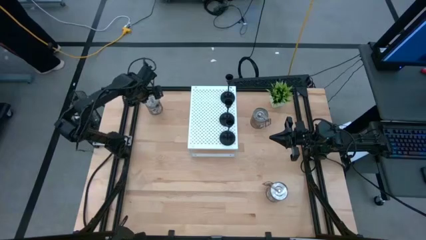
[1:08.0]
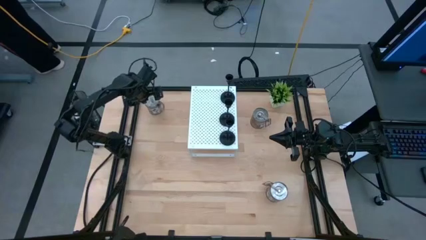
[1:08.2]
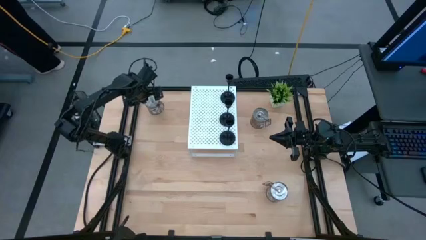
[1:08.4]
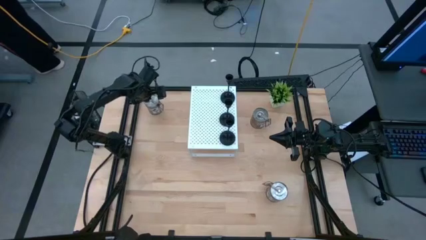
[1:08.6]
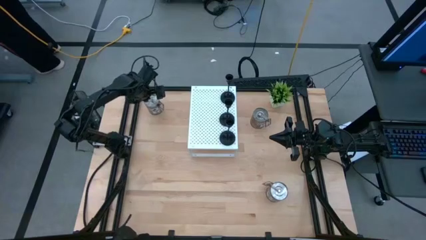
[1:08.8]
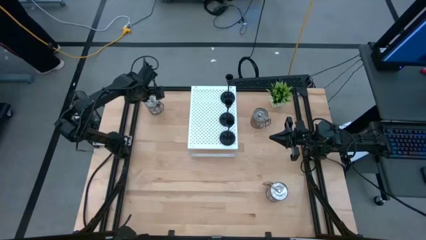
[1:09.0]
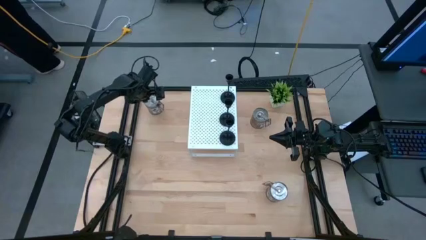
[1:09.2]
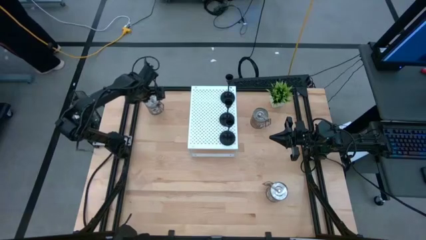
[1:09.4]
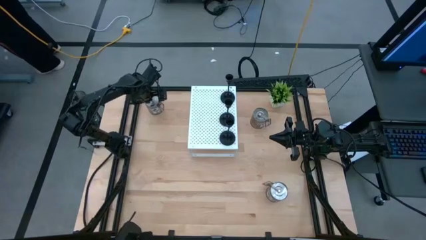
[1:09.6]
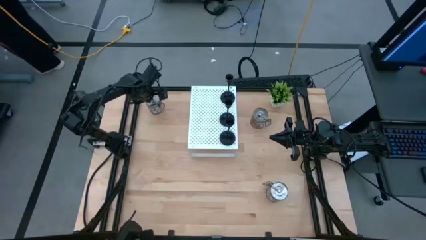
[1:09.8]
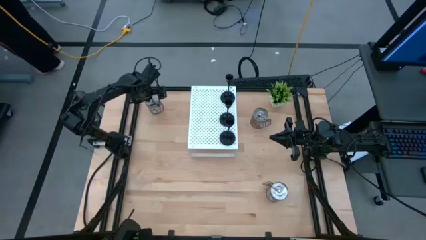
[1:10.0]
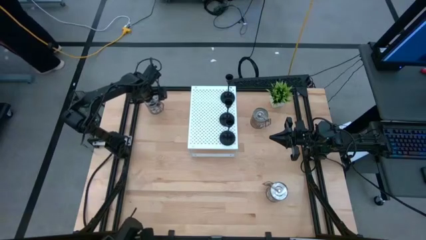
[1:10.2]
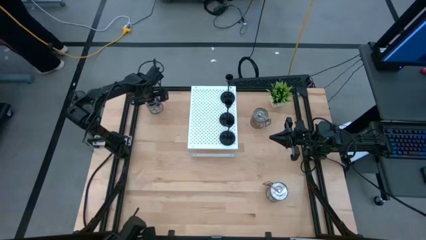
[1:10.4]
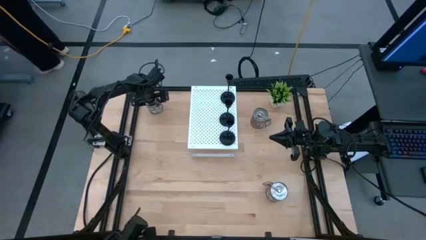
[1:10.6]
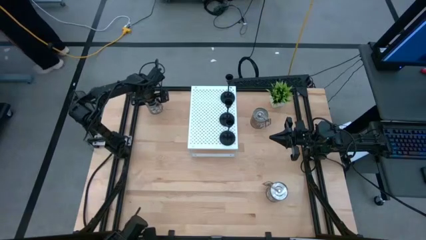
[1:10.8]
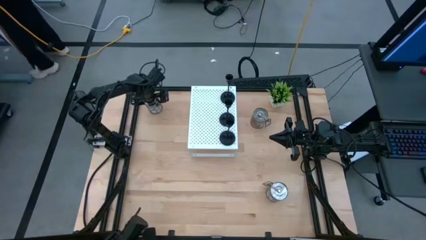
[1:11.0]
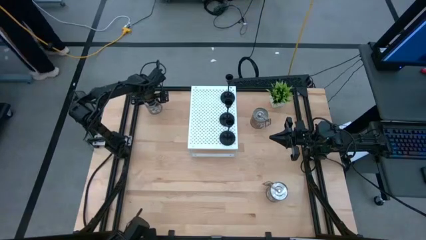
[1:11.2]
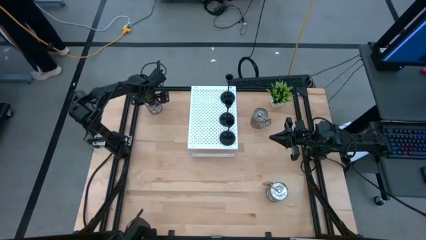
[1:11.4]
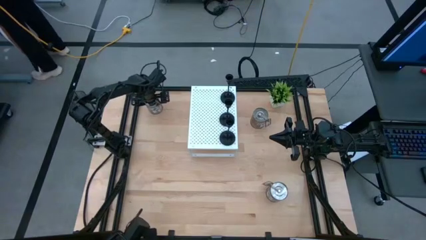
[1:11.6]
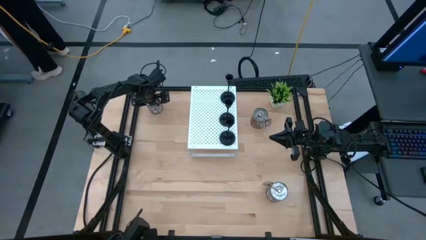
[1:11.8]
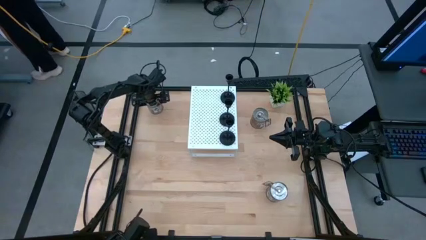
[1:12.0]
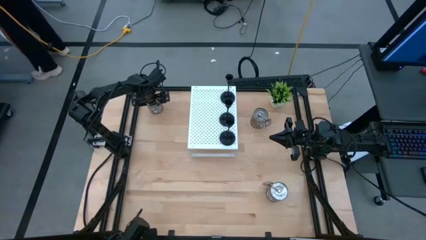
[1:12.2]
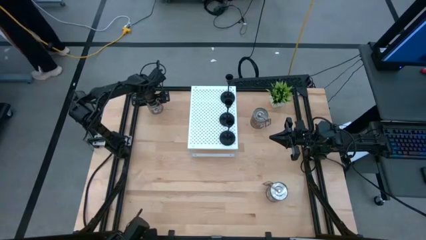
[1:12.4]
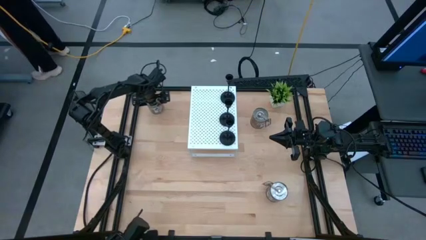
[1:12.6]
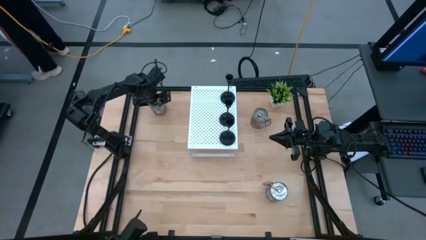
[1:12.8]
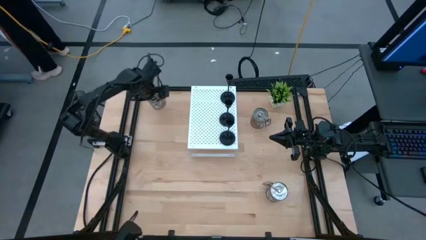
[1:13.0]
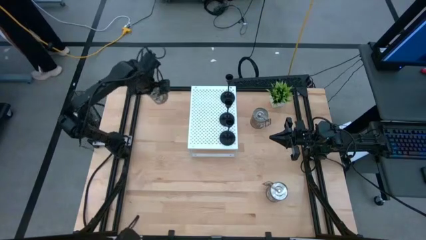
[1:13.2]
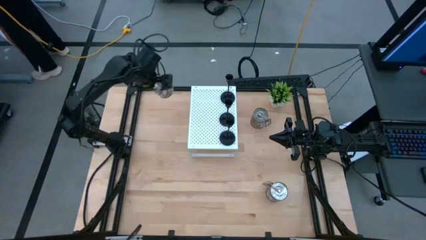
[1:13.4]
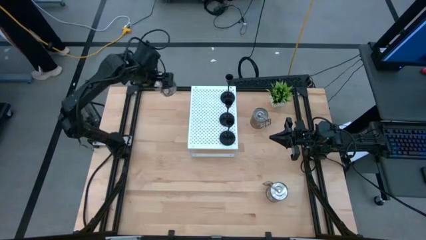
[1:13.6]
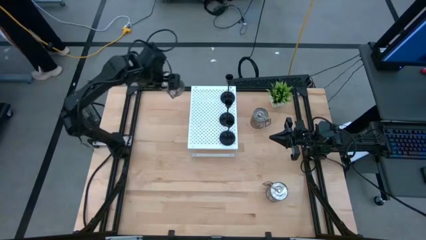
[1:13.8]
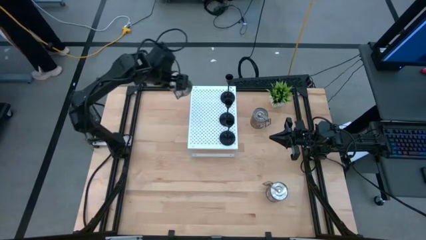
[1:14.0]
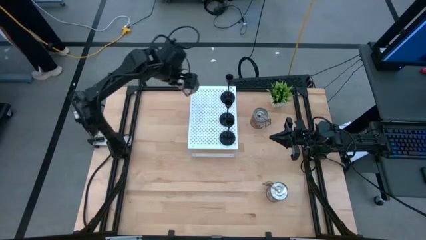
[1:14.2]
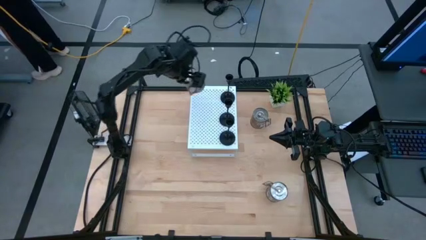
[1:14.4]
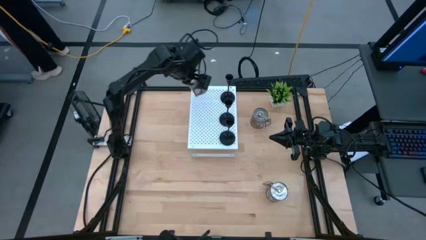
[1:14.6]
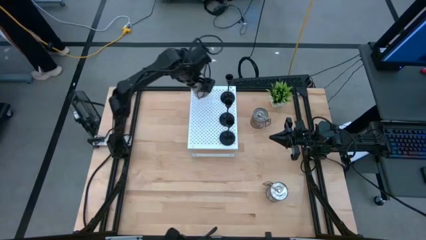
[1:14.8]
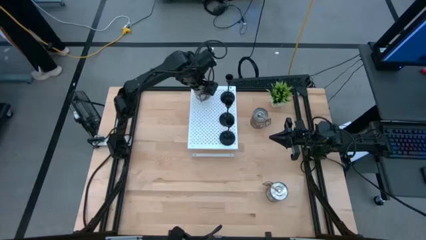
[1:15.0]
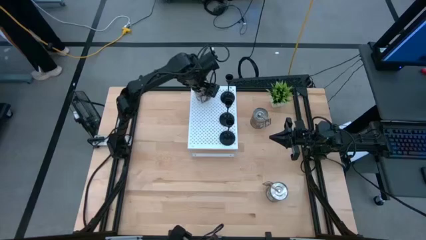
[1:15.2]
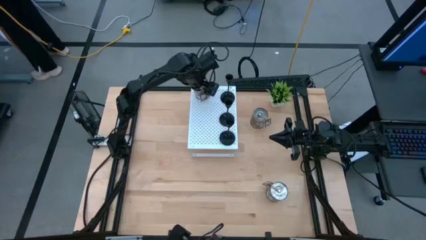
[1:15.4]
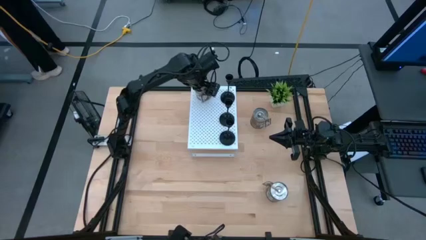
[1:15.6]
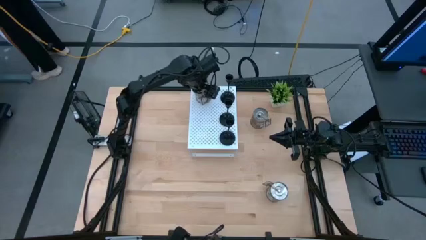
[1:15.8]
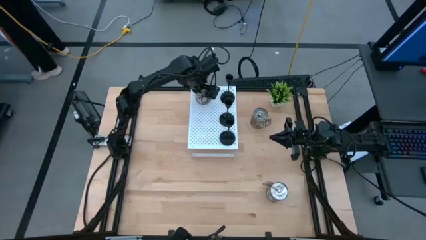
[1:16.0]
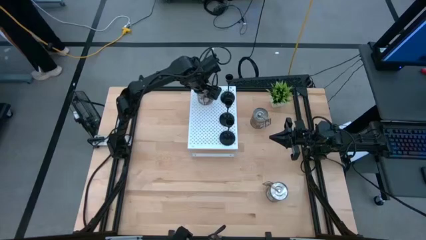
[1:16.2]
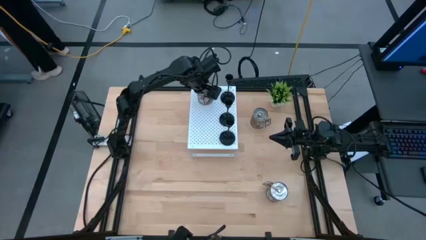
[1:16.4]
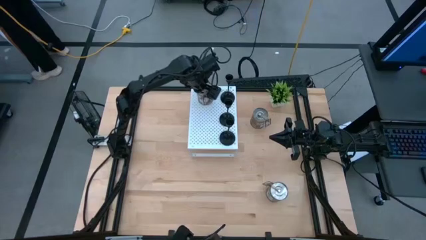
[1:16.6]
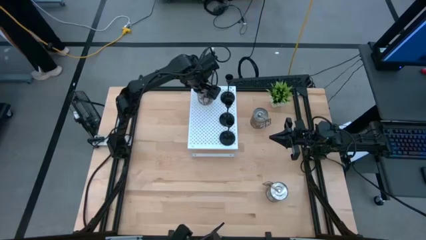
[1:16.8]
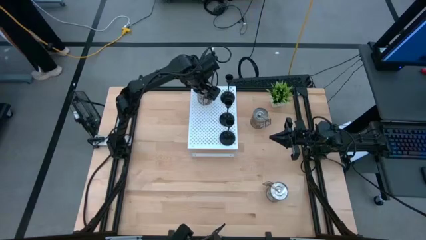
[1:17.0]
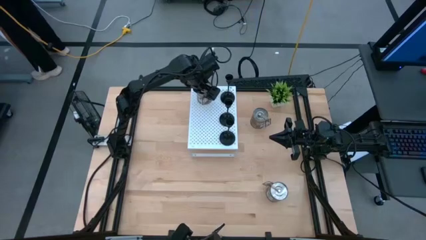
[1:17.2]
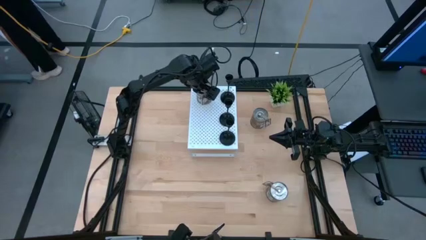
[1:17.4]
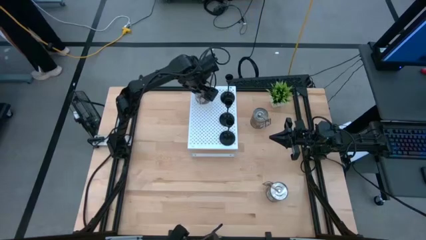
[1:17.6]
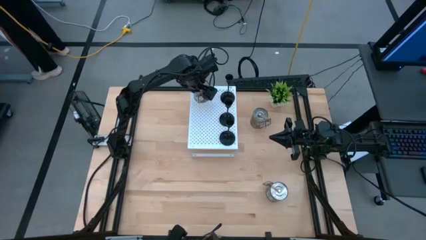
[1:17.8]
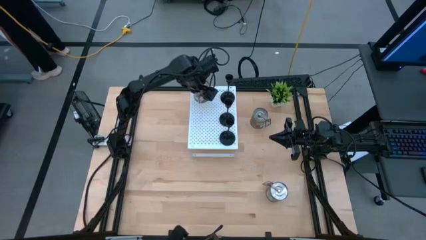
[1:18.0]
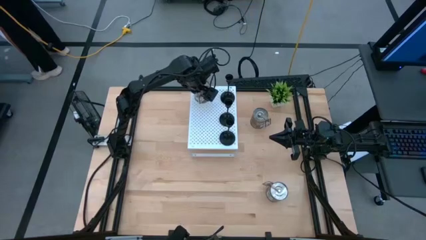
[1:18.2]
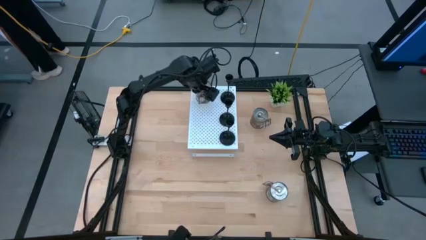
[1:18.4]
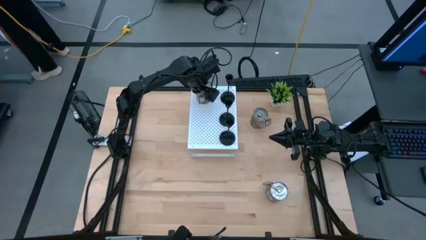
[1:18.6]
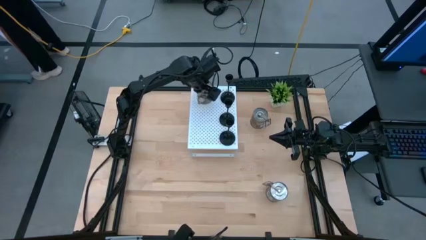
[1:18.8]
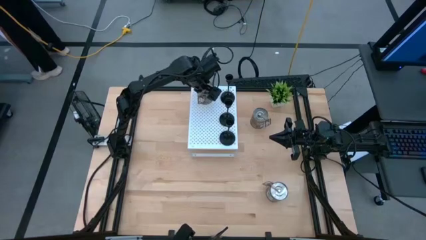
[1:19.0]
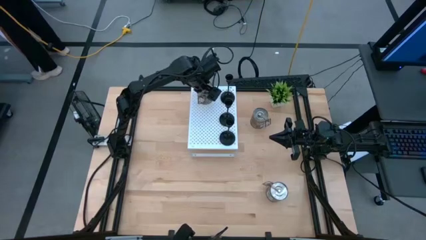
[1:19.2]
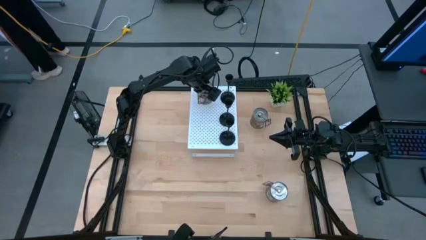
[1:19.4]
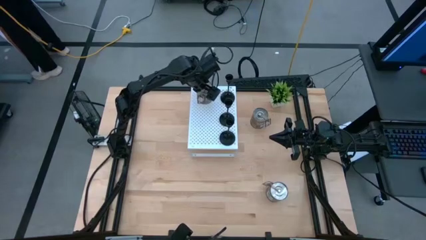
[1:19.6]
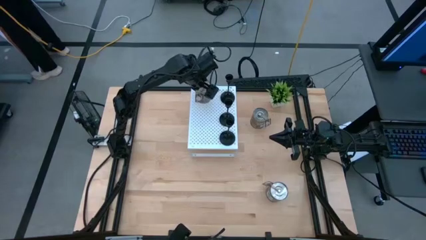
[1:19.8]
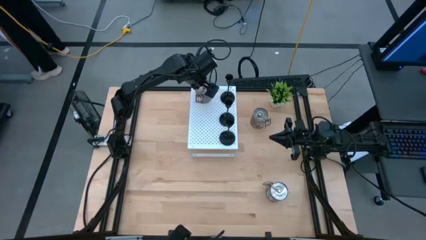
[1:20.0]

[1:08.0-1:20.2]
Task: Pick & Place candle stick holders
Put the top left brown scented candle on the shelf

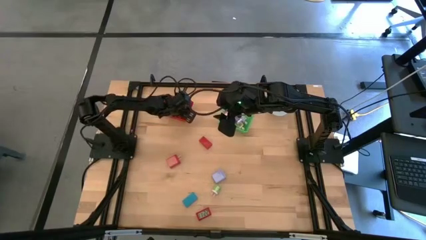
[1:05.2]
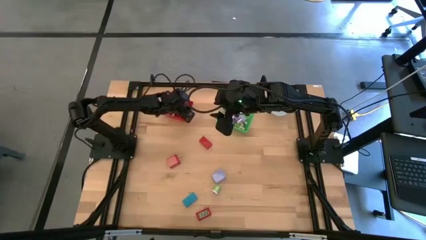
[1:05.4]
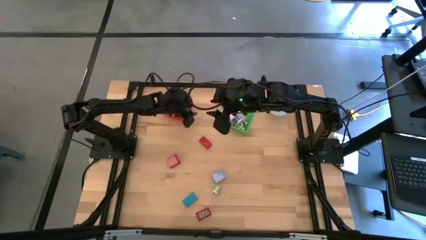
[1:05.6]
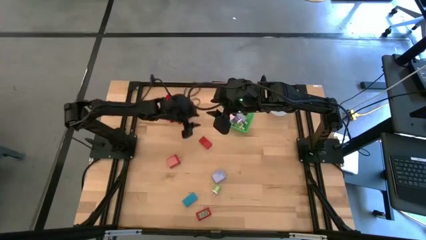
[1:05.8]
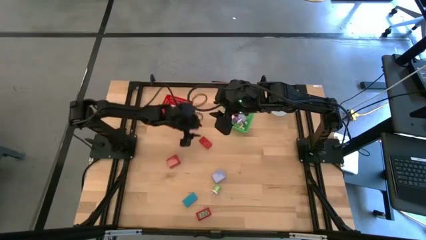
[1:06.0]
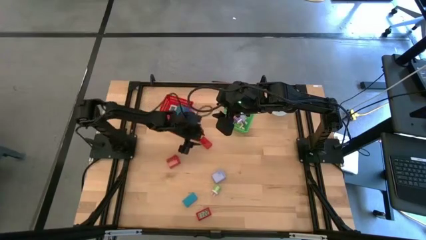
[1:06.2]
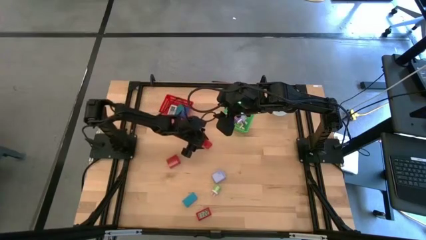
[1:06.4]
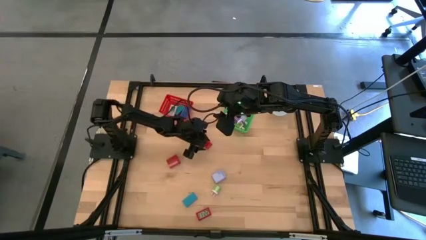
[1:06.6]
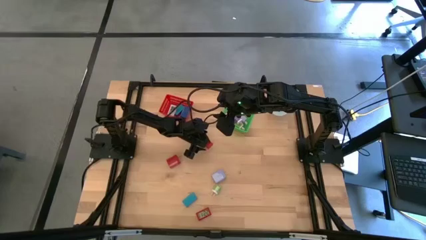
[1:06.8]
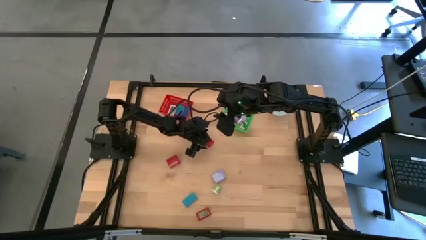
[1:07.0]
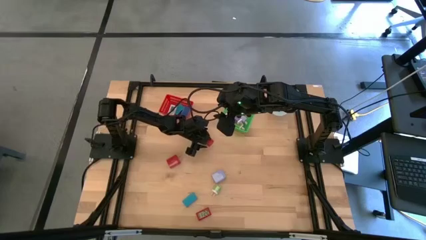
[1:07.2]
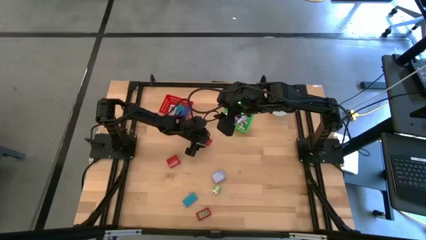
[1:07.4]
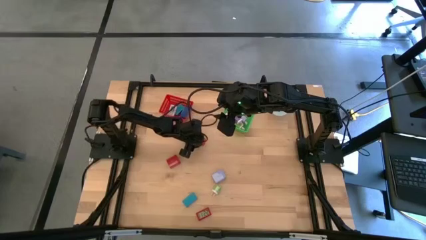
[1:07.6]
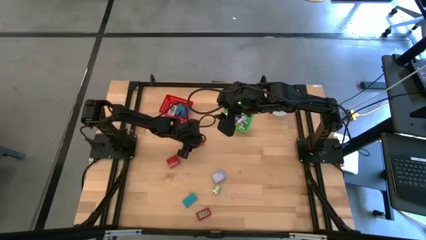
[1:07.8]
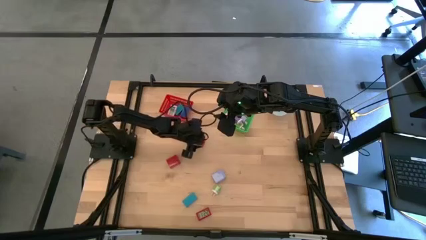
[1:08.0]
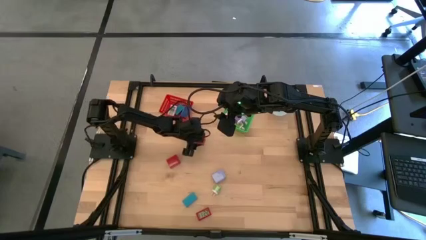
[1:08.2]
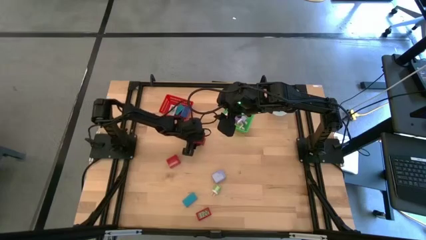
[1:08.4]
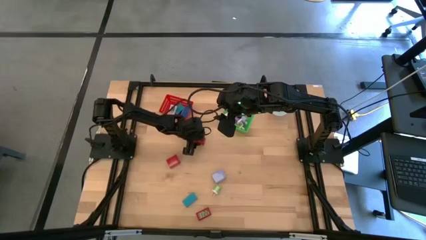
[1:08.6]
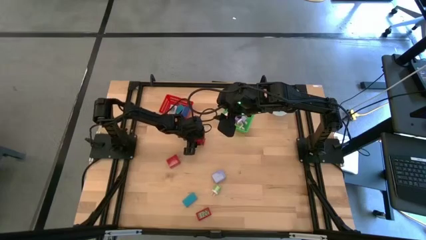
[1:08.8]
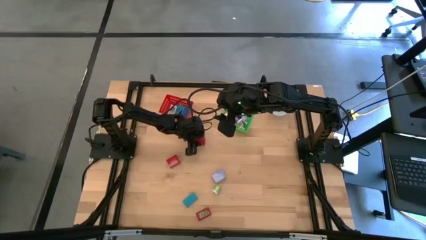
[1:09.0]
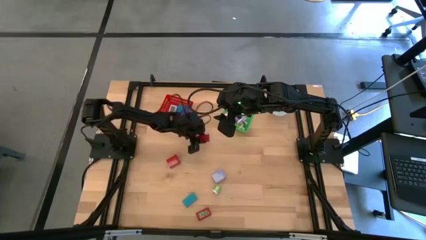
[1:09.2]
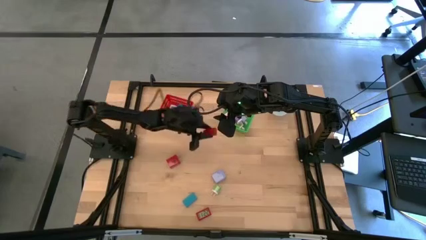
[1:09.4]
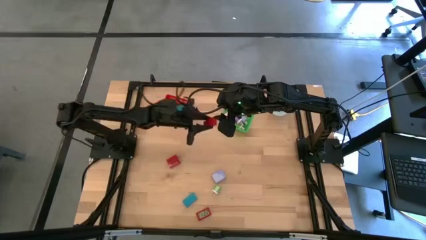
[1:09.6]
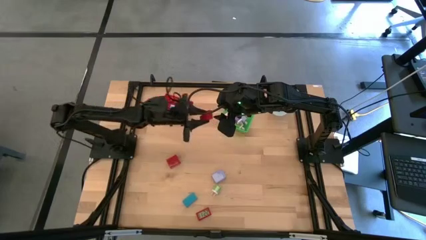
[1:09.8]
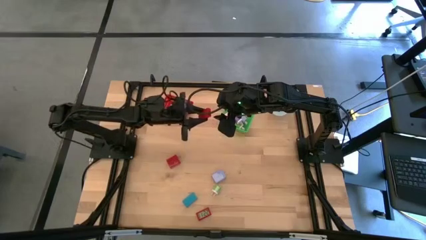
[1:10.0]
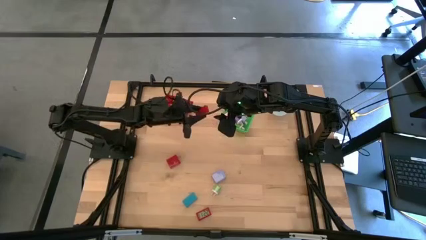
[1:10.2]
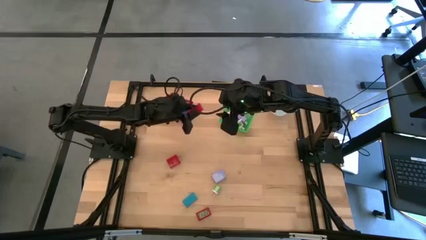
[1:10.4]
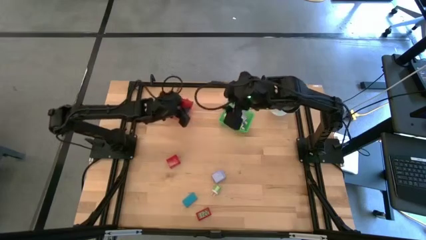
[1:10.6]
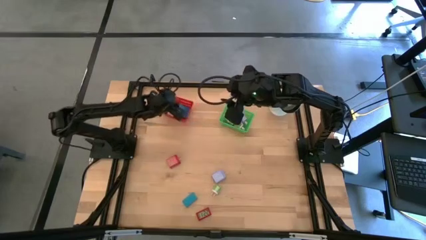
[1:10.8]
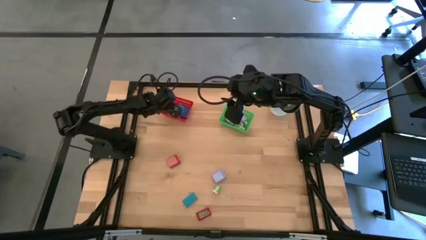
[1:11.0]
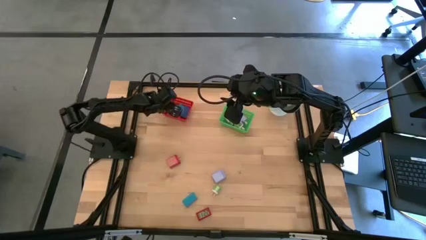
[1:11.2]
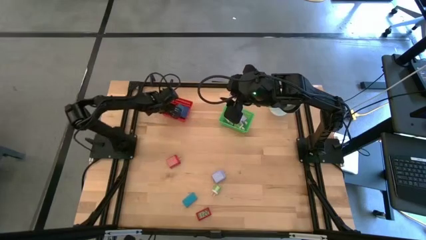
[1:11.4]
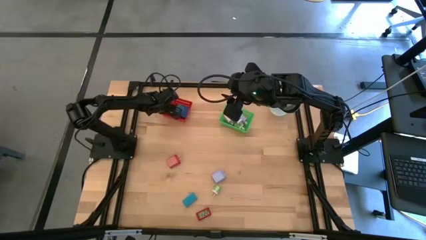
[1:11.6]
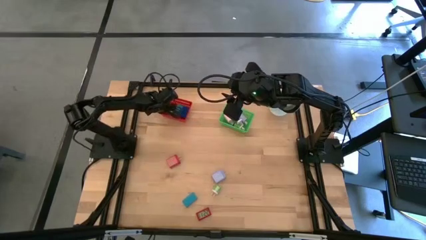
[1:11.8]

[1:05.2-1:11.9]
Task: Pick & Place Office items
Put the top red digital clock into the red bin
